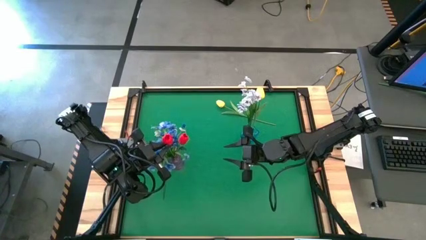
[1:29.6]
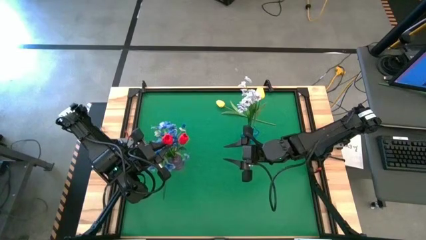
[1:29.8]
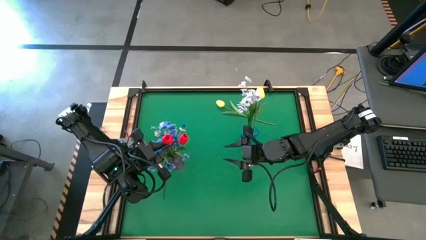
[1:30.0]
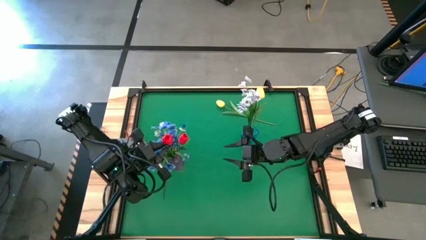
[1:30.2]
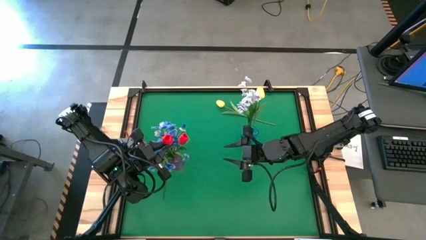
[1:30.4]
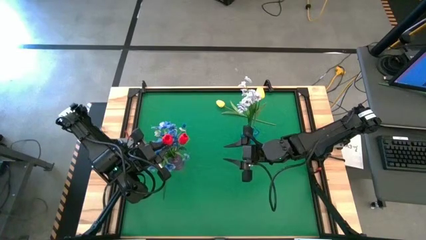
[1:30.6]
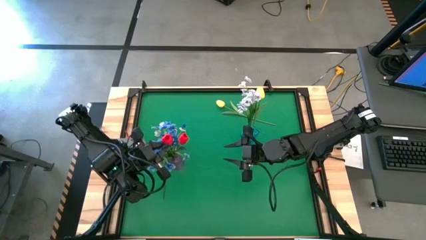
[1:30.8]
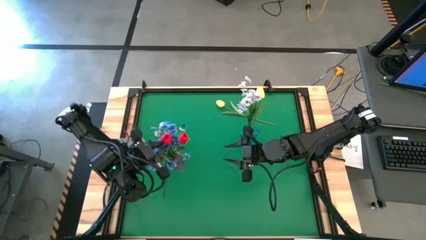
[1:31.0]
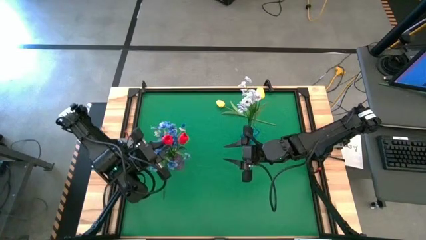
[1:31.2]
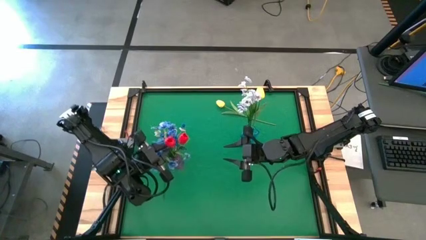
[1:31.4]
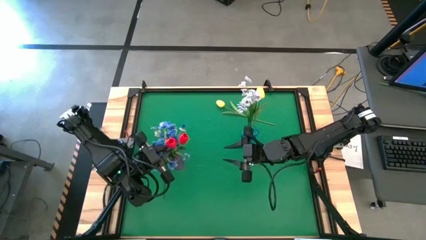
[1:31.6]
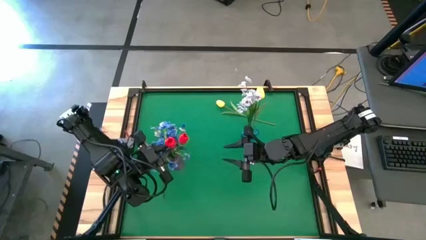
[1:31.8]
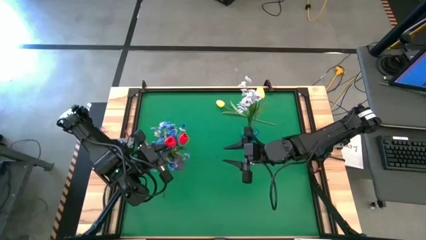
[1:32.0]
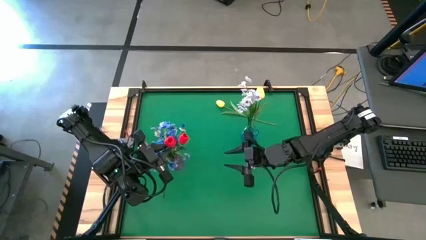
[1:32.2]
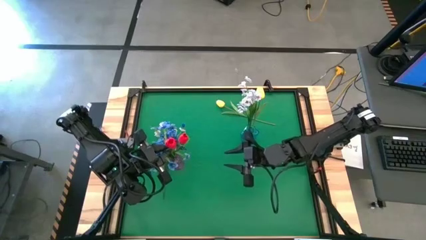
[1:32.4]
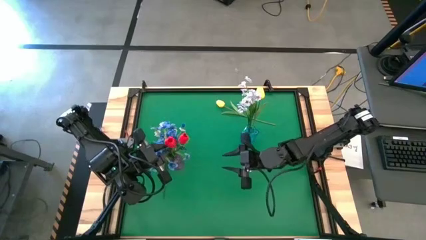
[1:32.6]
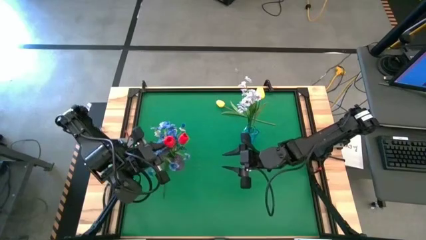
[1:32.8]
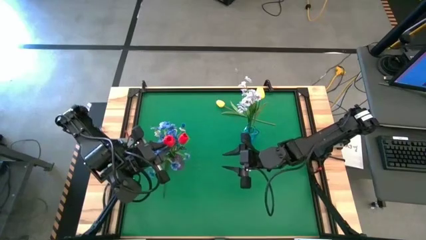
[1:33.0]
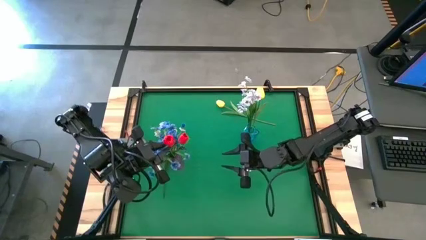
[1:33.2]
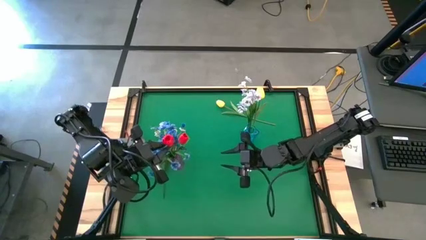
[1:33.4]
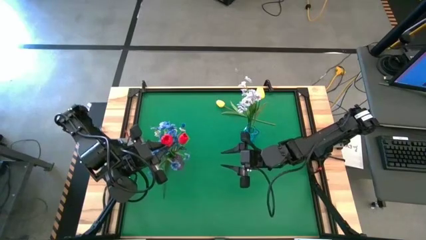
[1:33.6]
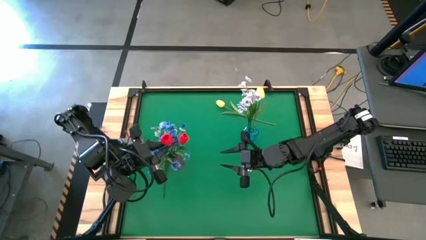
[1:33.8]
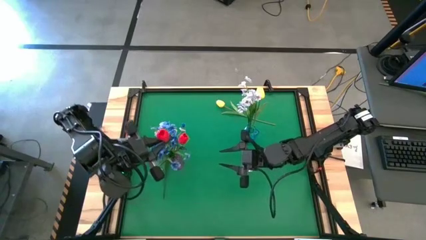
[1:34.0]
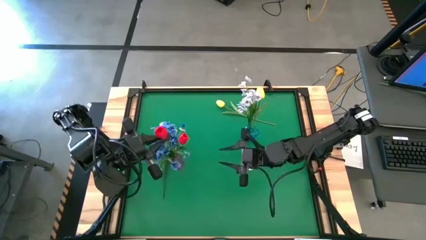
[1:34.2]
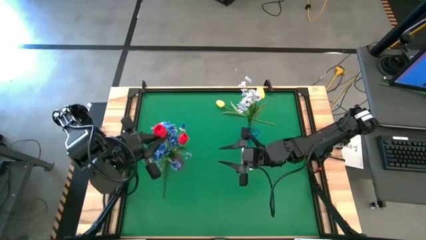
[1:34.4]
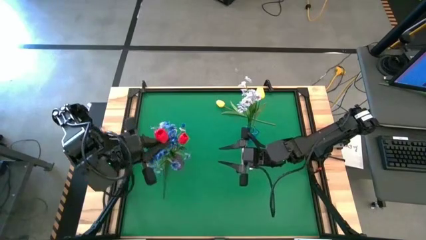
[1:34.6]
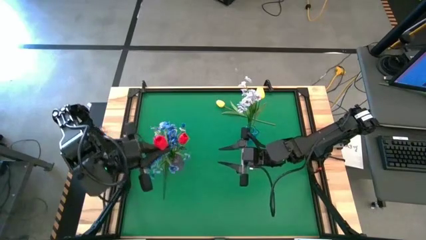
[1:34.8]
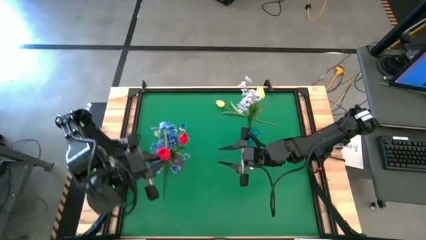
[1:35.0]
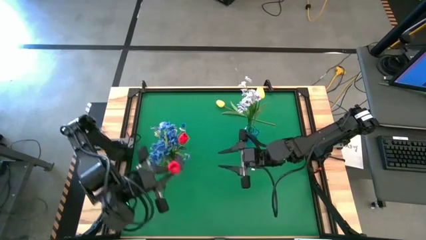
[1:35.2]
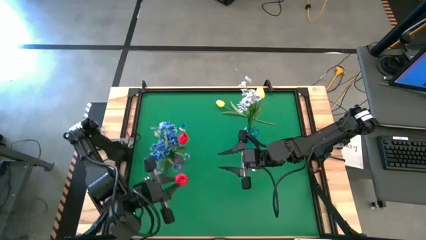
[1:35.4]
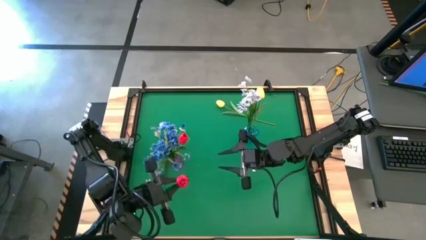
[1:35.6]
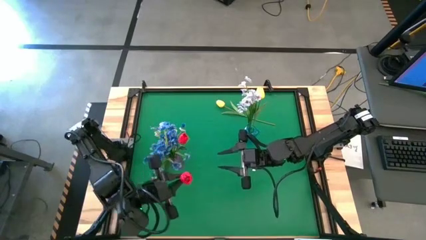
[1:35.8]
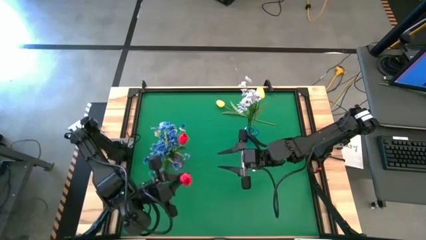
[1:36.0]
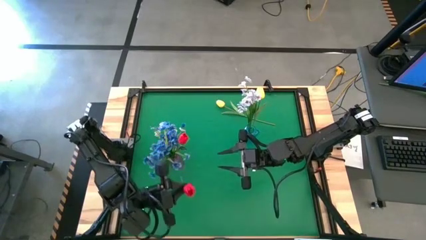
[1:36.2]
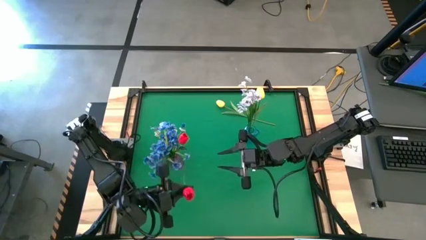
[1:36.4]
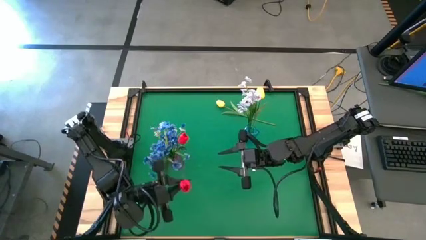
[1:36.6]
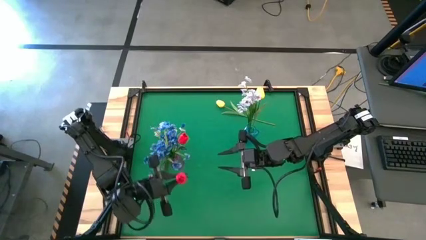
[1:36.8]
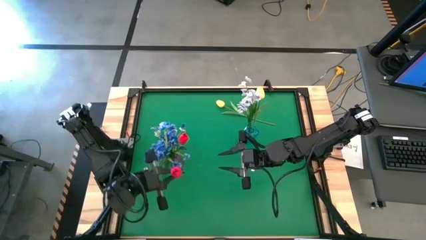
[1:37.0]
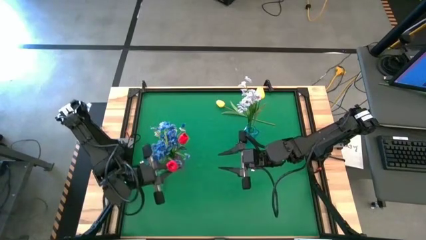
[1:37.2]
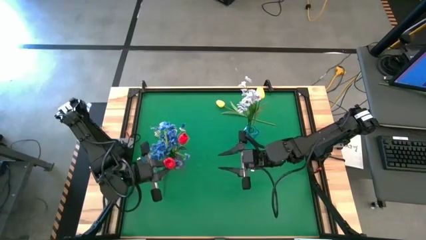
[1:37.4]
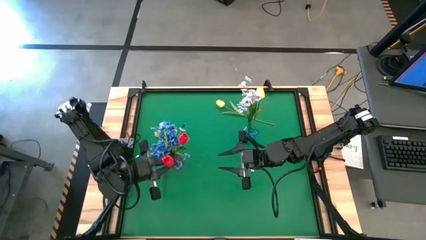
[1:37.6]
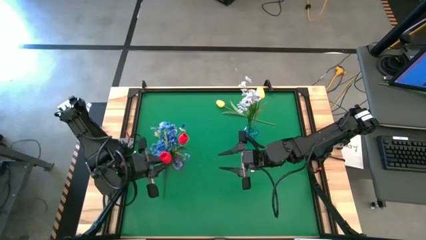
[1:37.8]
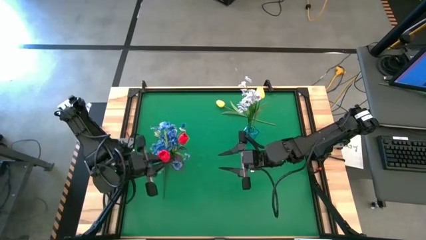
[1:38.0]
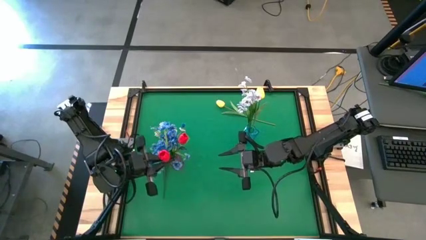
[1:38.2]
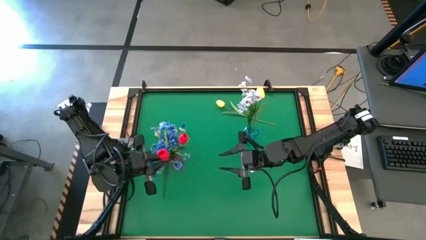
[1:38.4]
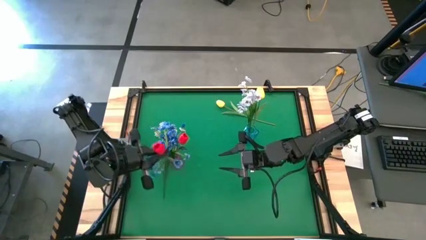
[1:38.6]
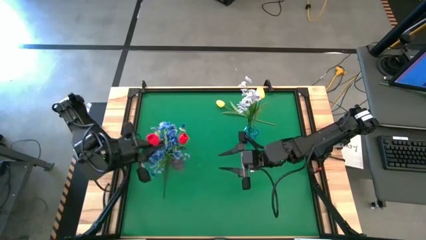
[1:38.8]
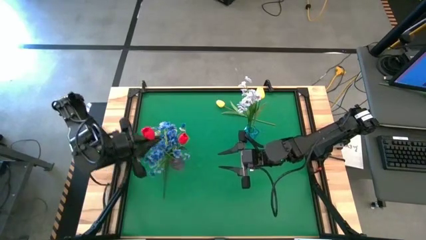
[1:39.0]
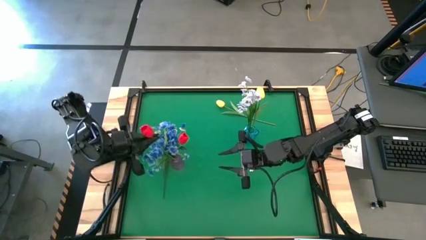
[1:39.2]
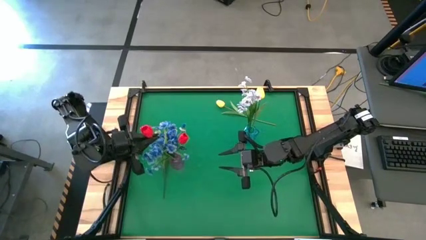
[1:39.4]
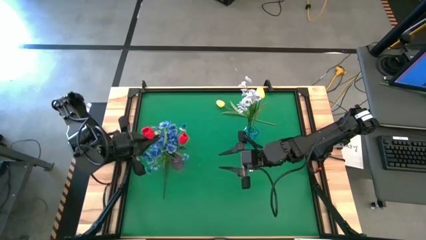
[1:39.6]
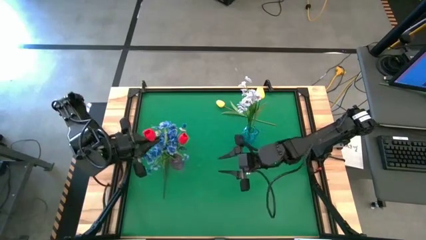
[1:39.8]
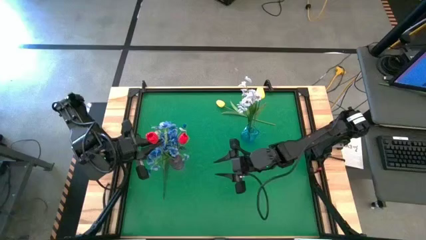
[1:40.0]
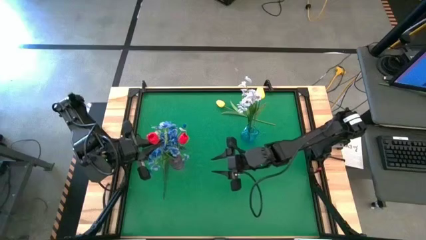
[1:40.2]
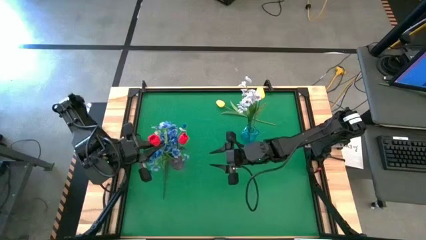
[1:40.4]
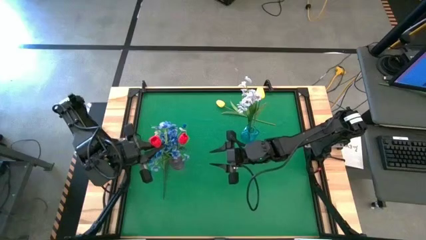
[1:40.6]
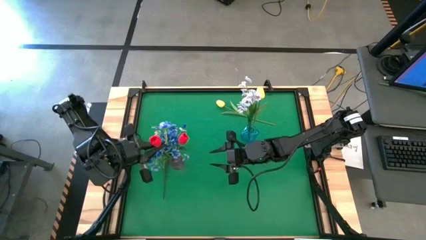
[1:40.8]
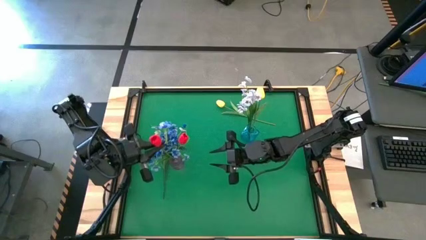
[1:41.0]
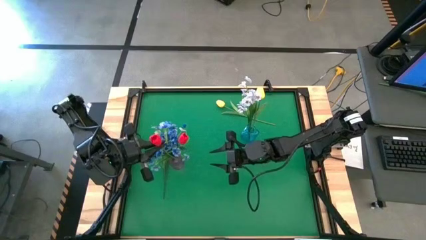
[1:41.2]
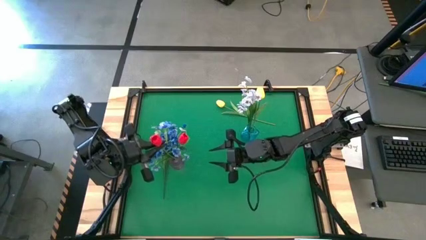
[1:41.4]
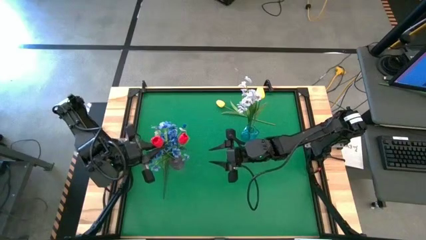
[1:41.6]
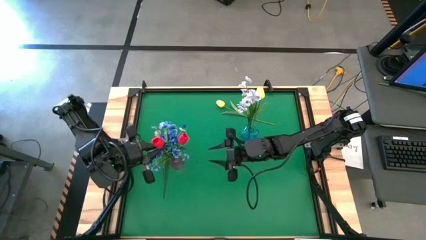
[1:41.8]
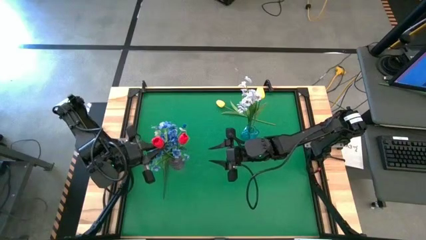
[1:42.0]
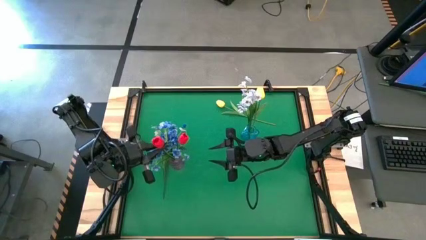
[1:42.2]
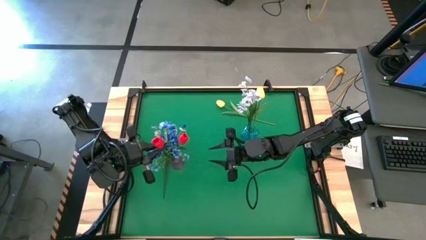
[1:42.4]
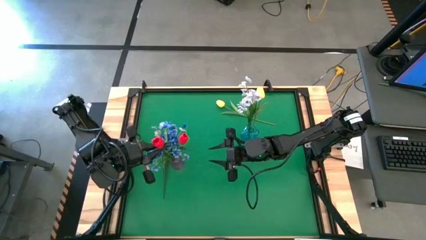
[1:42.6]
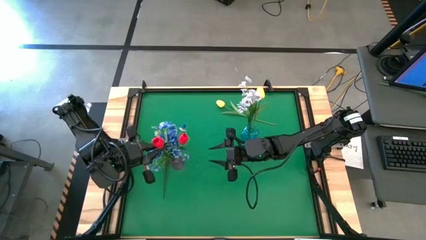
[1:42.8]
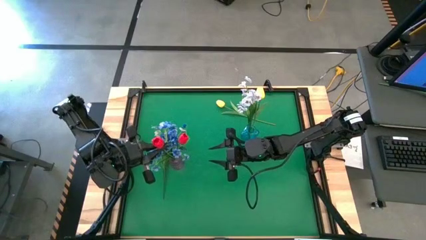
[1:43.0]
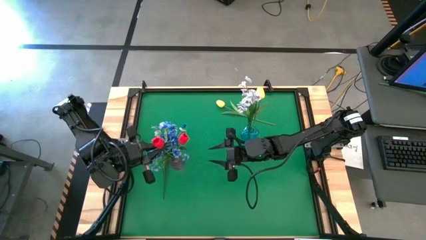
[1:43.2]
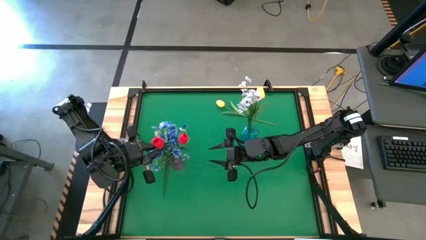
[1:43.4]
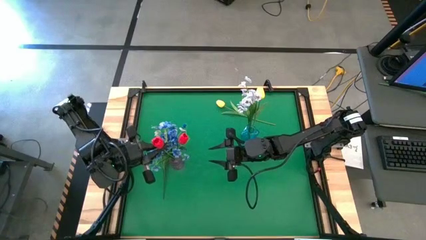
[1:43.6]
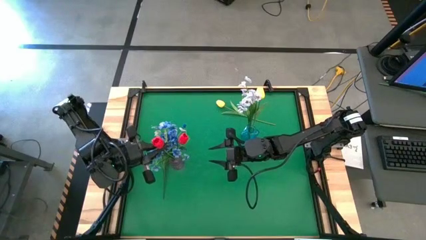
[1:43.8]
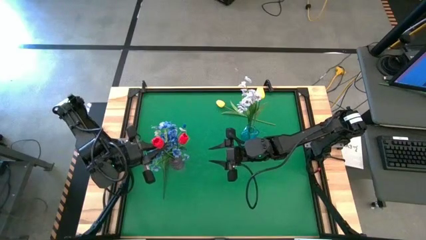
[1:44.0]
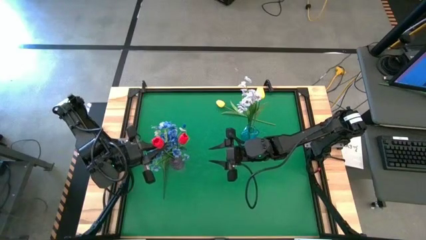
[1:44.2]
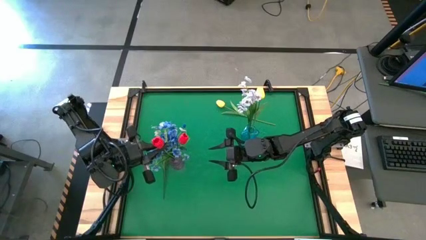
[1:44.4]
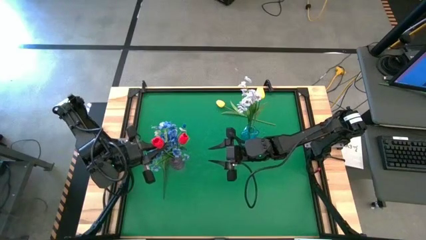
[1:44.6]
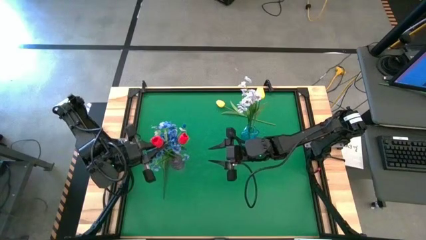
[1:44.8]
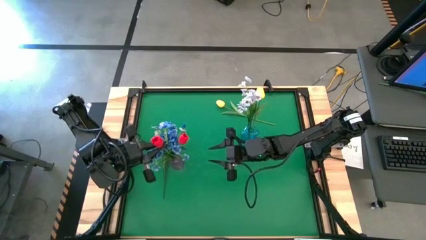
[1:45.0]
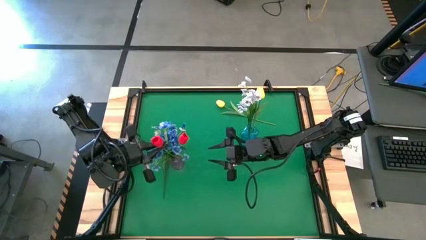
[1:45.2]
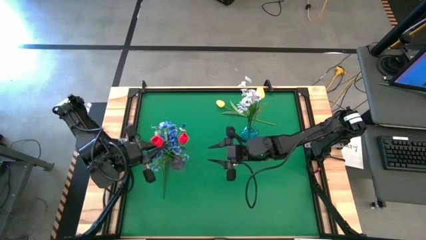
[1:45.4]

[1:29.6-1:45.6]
Task: Sort flowers into vase by color
Put the red tulip into the violet vase
